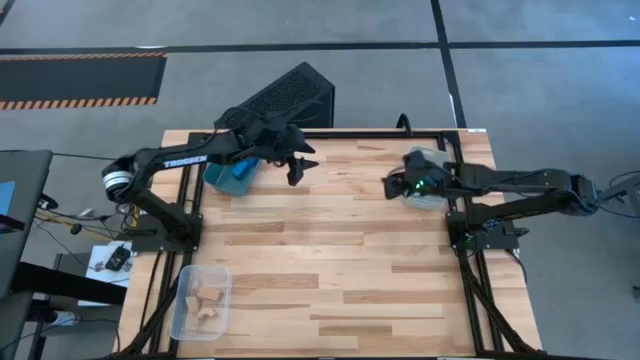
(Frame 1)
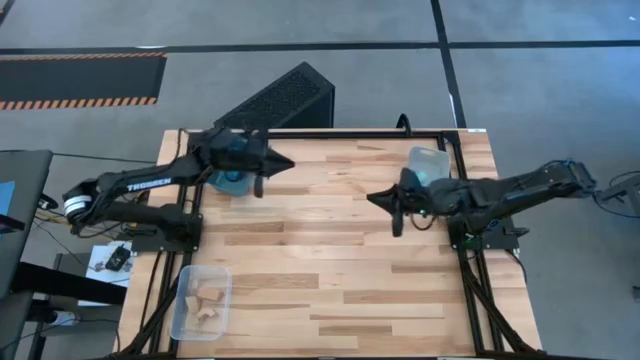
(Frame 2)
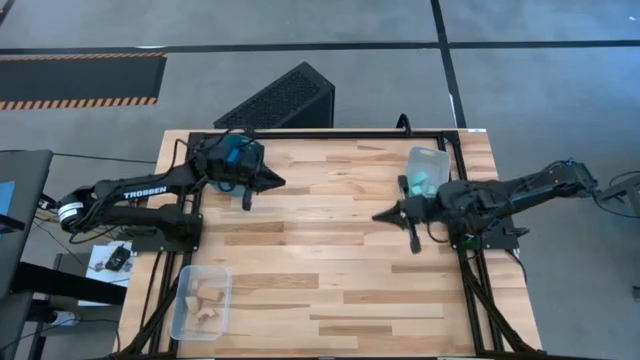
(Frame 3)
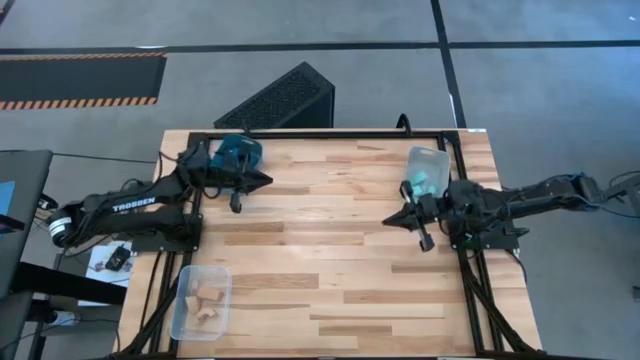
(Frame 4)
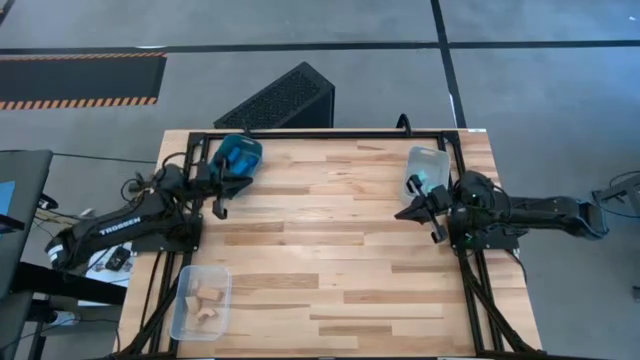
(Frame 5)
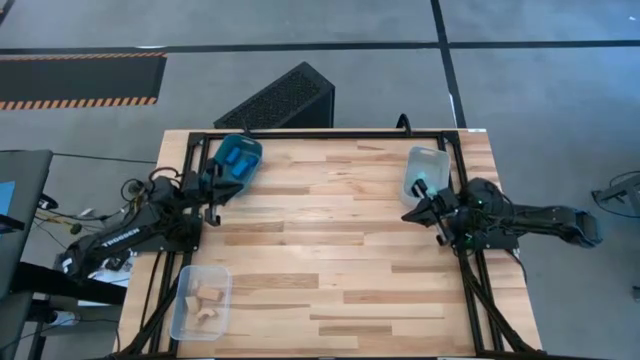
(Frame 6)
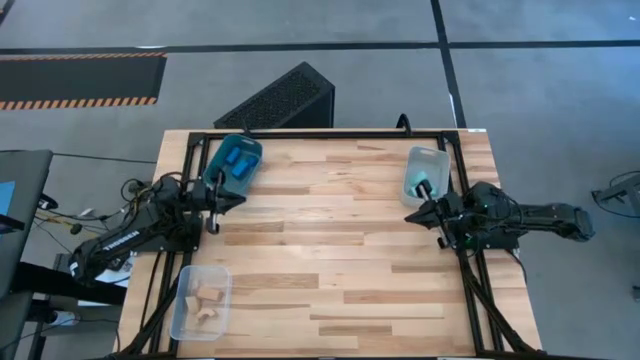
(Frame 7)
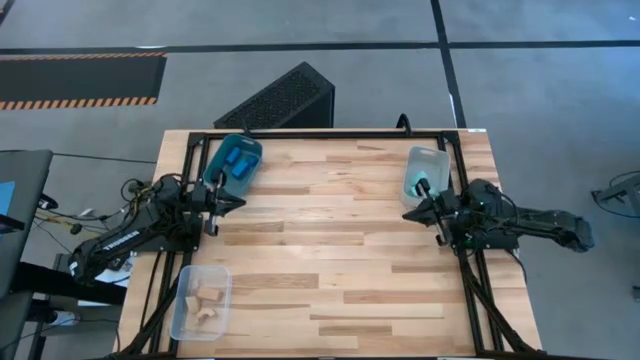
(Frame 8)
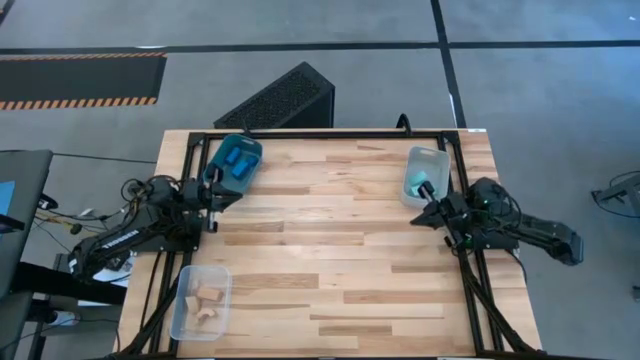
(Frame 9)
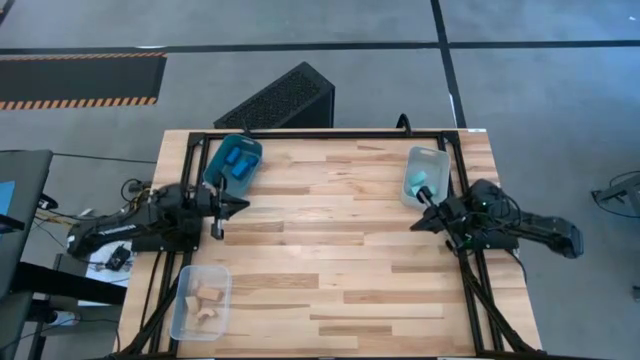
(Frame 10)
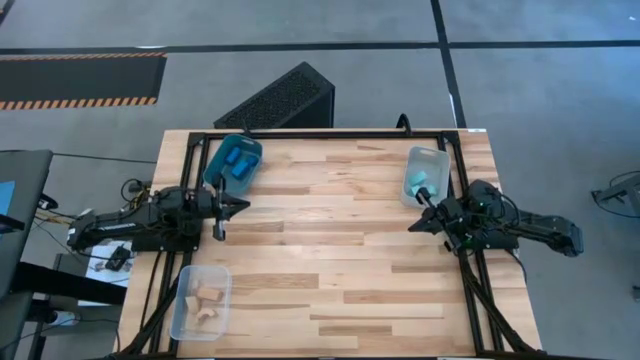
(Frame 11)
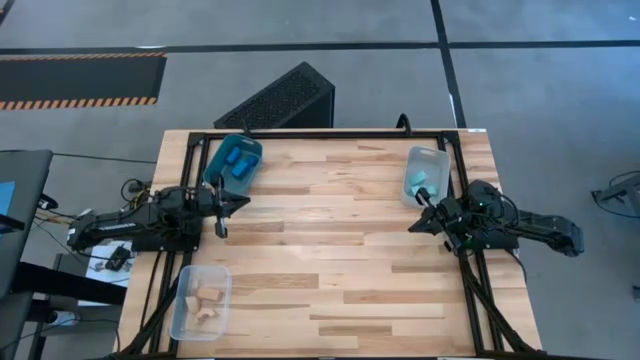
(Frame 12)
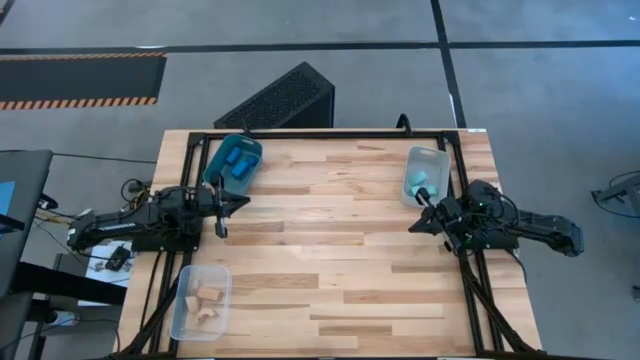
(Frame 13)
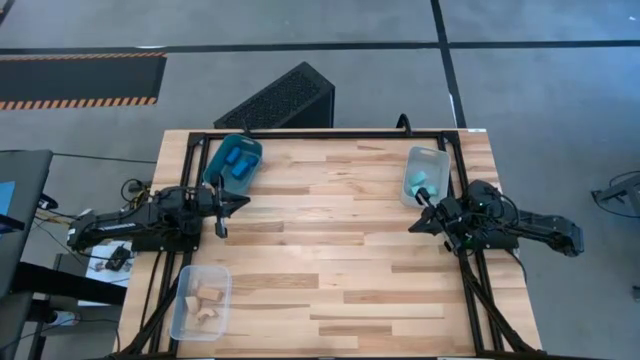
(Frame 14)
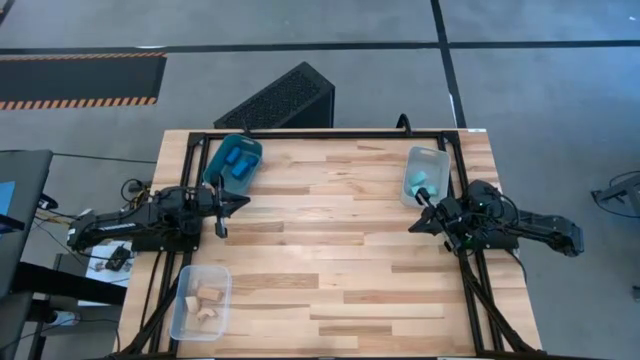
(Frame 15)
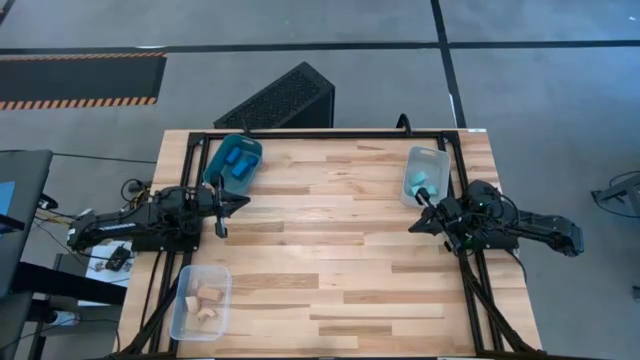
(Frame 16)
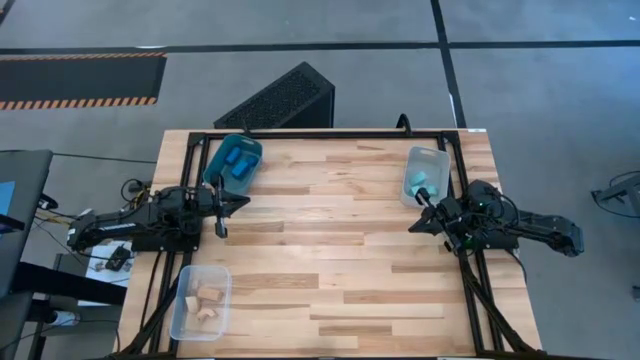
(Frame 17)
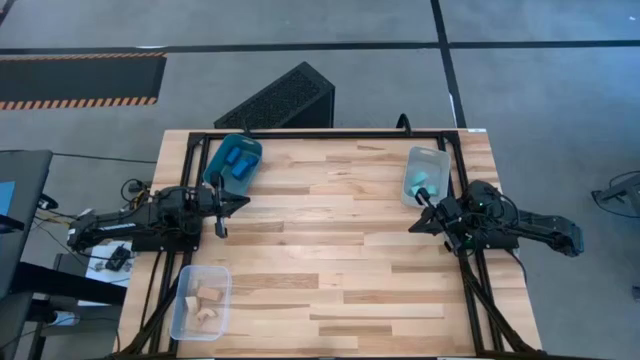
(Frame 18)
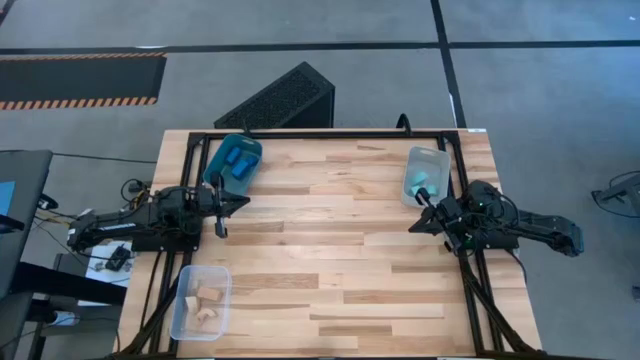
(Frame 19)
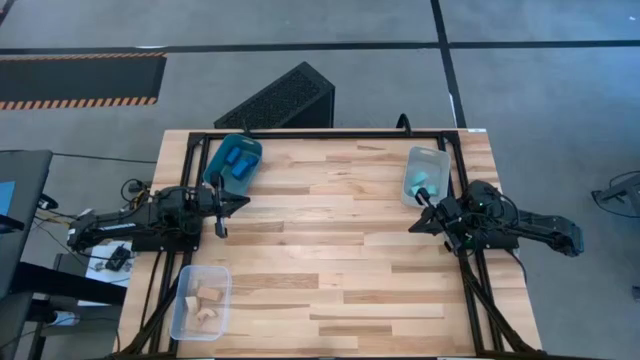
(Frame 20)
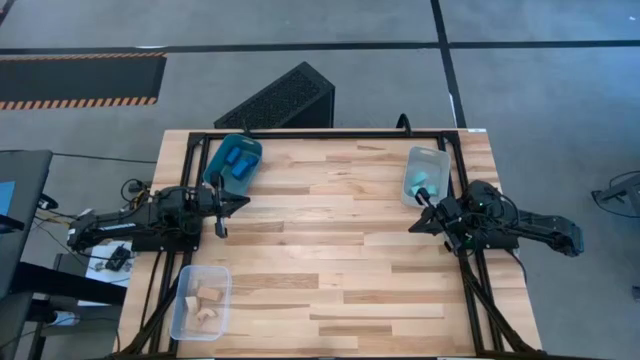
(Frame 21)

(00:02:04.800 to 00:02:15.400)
Task: Sort & place blocks by color
Return to Home Position

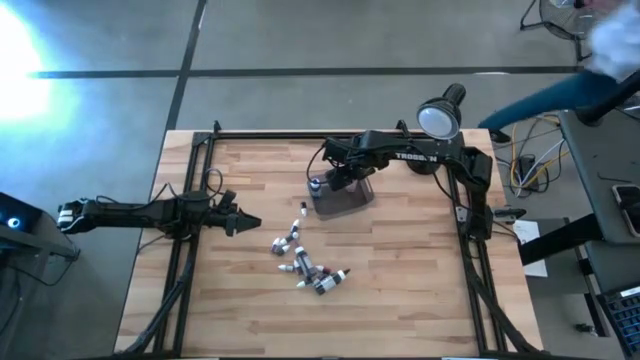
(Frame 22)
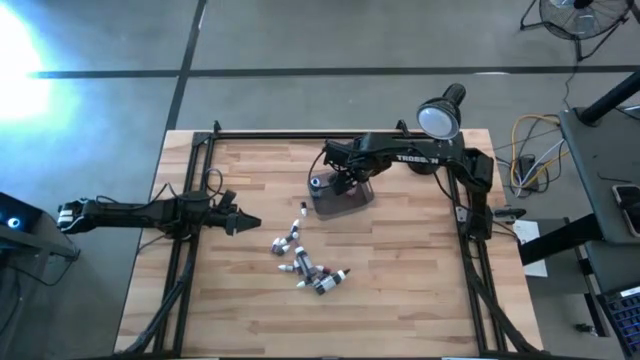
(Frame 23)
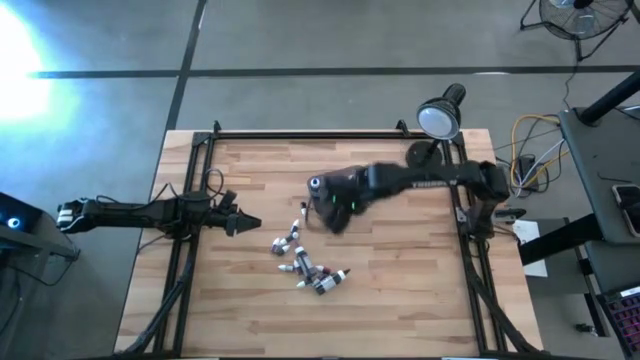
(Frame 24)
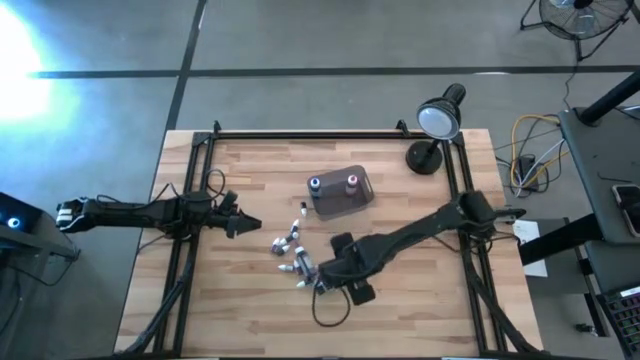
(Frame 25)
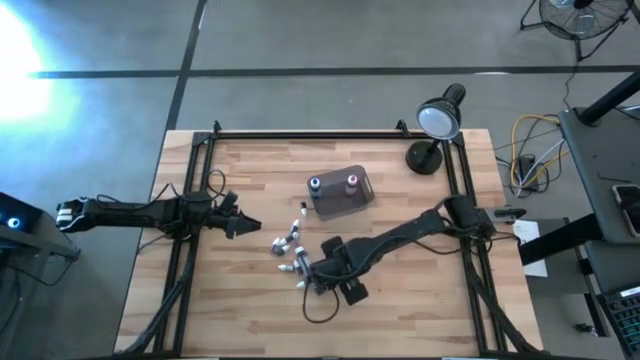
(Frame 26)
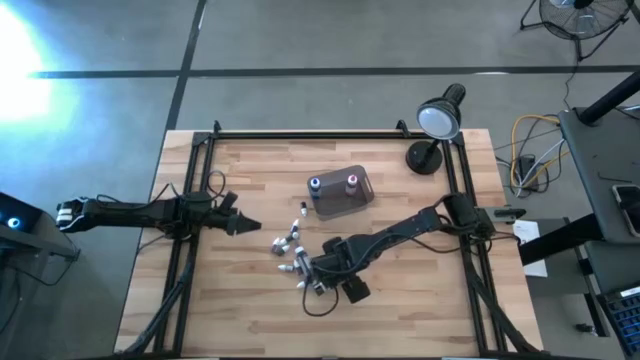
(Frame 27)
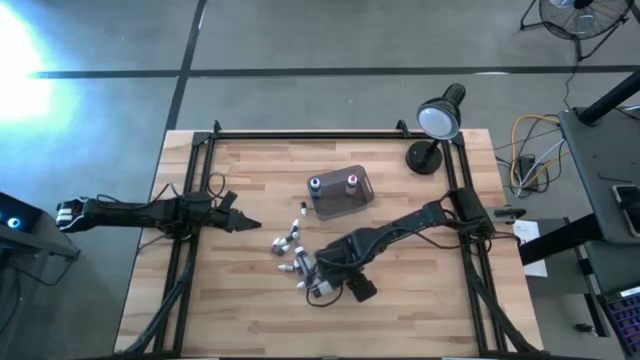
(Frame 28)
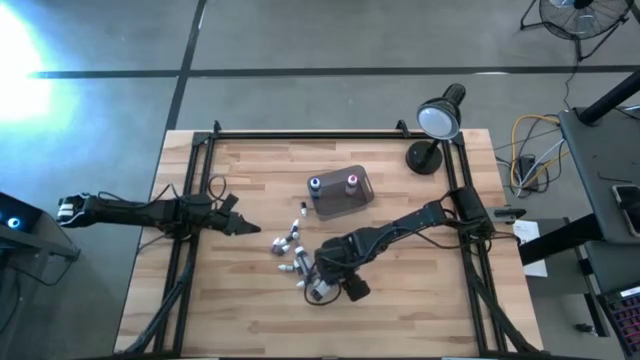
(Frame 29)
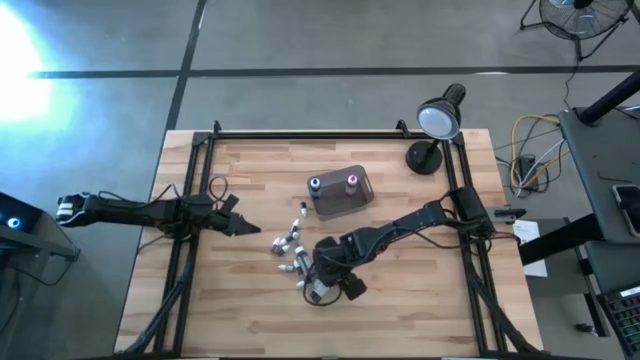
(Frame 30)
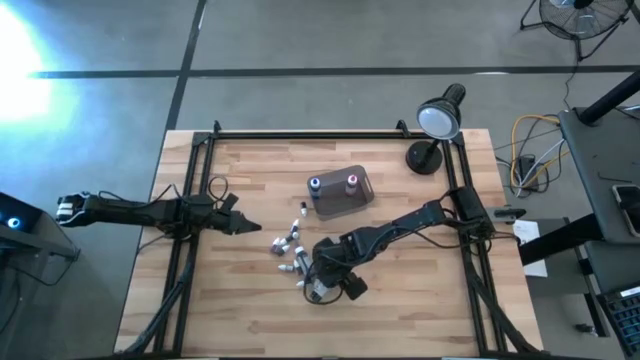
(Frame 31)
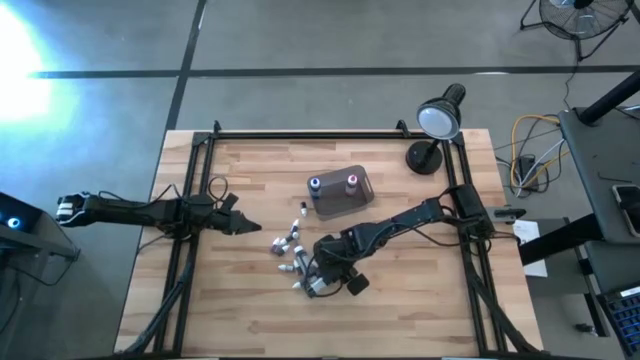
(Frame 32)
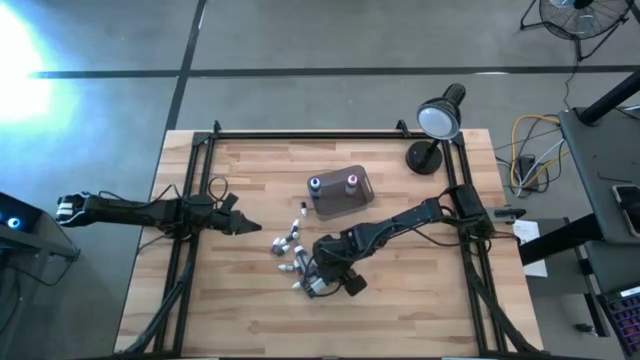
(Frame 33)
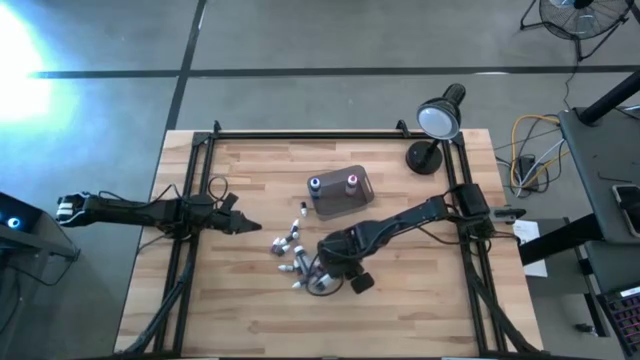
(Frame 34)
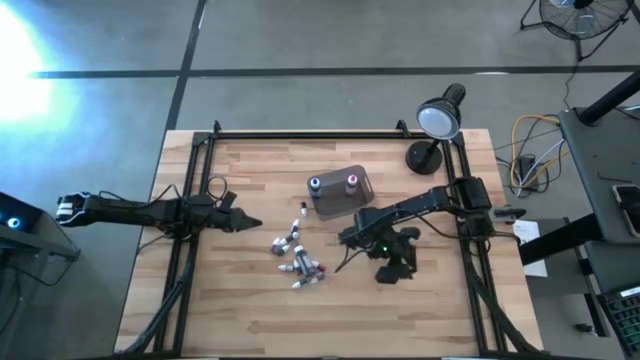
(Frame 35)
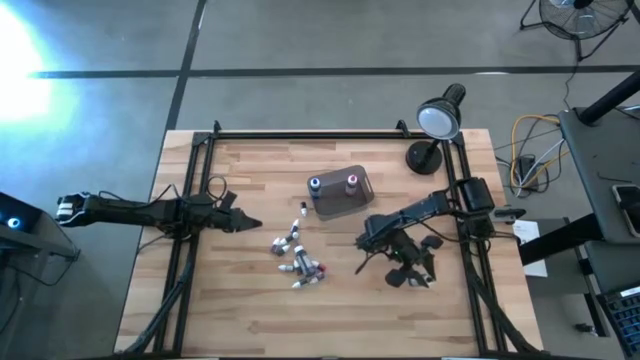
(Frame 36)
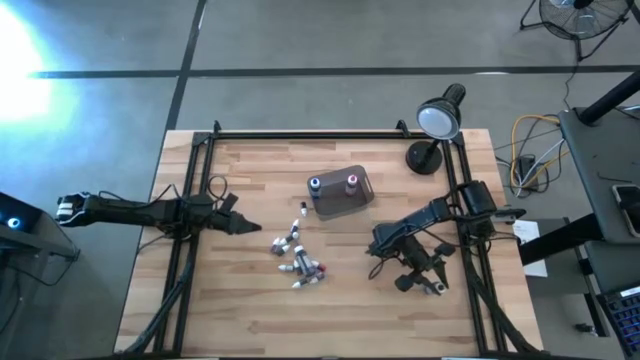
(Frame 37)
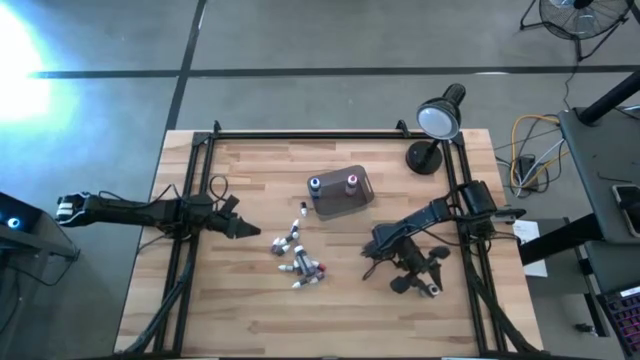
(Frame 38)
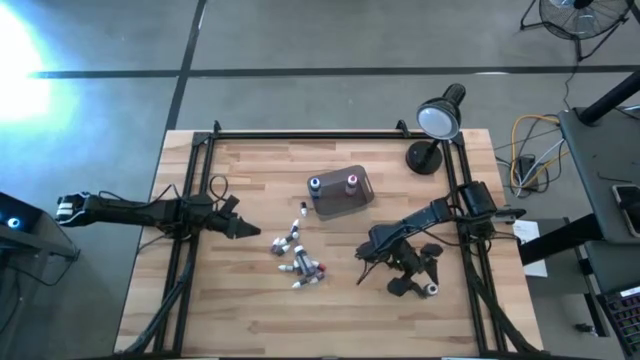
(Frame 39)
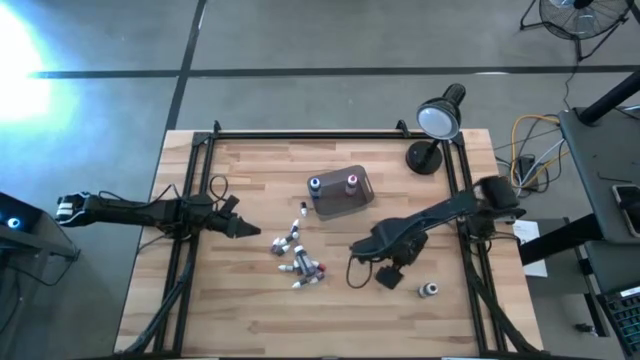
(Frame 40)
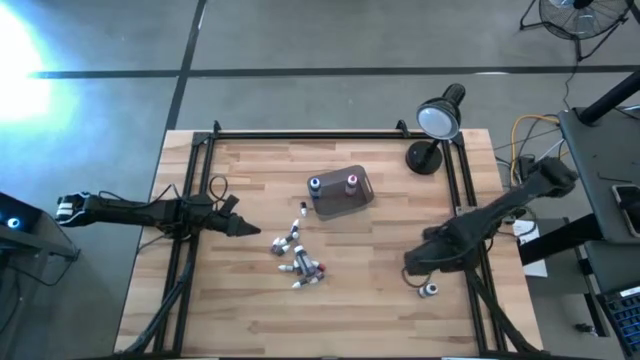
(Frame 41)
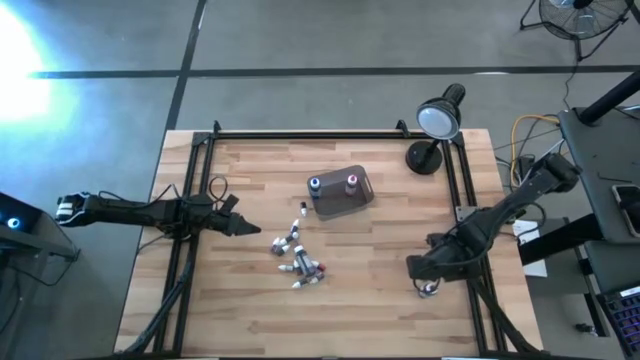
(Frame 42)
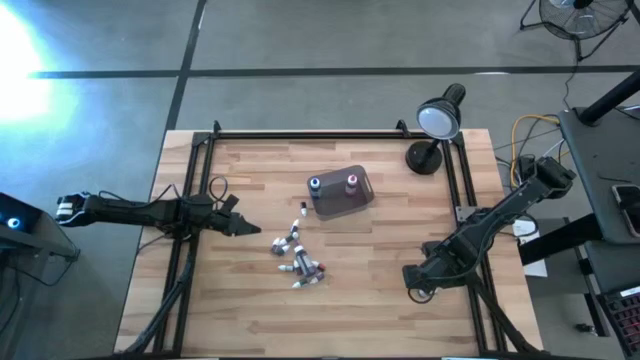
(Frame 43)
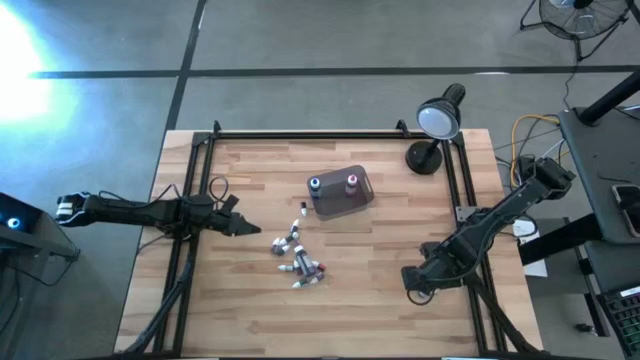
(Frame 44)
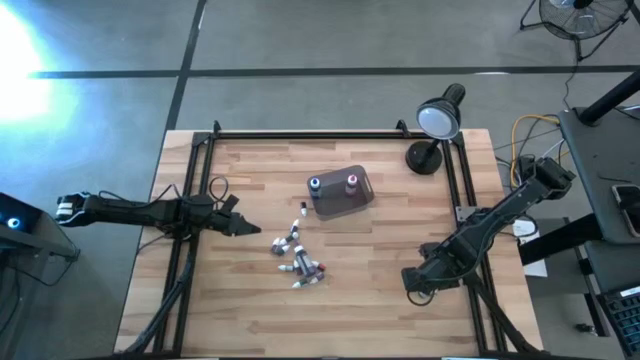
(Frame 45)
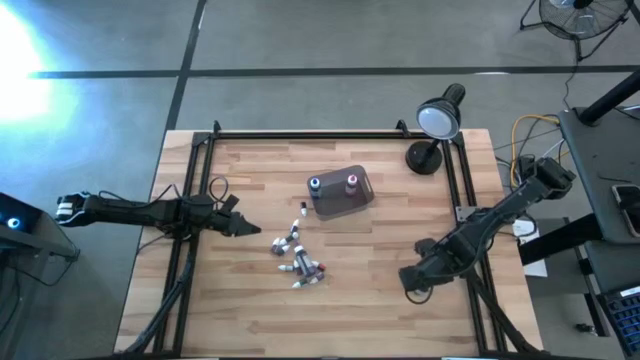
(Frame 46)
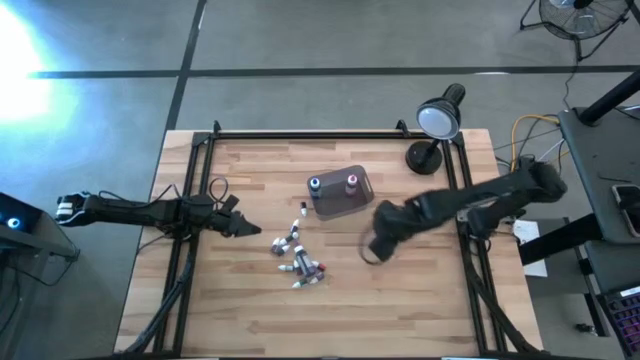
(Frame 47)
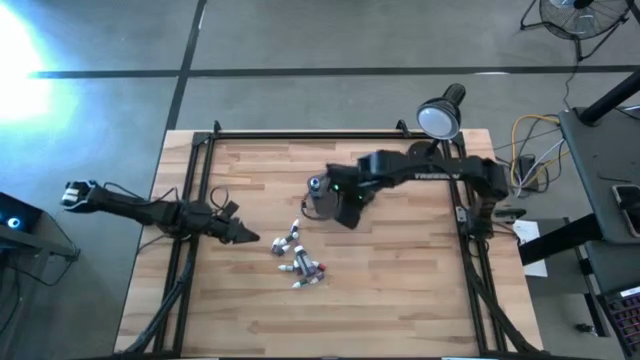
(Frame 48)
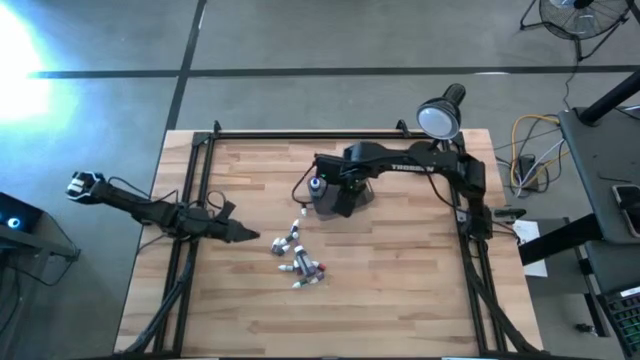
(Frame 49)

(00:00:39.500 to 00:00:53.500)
Task: Pick & Place food coloring
Put the big black food coloring bottle into the black bin
